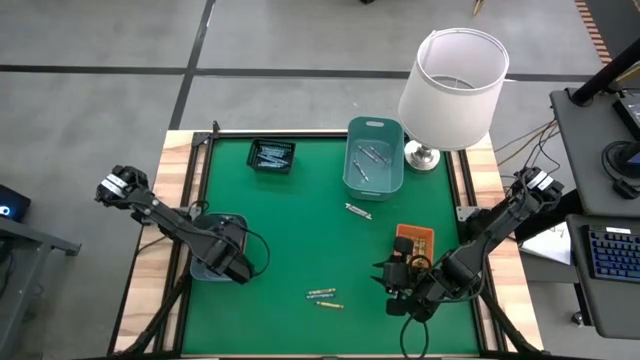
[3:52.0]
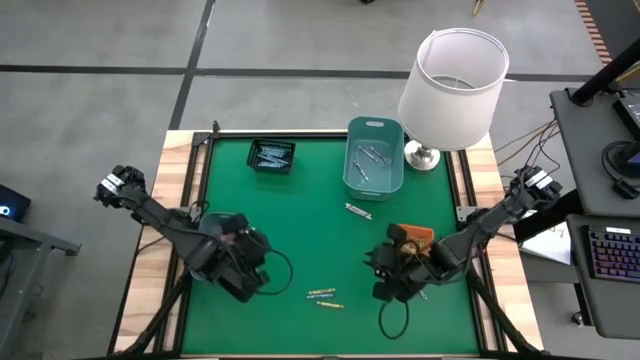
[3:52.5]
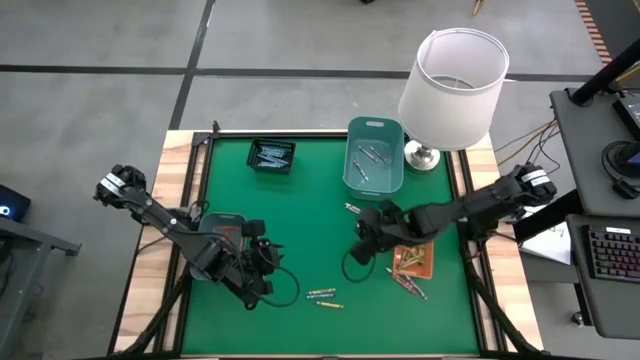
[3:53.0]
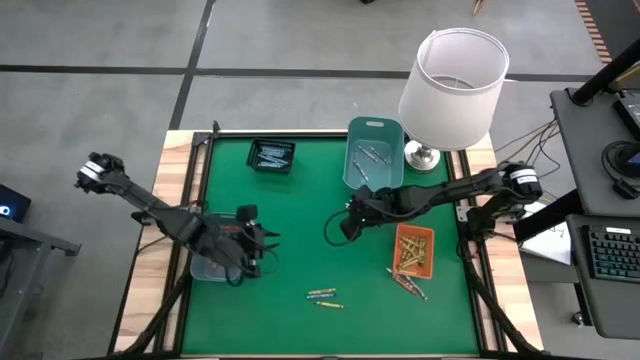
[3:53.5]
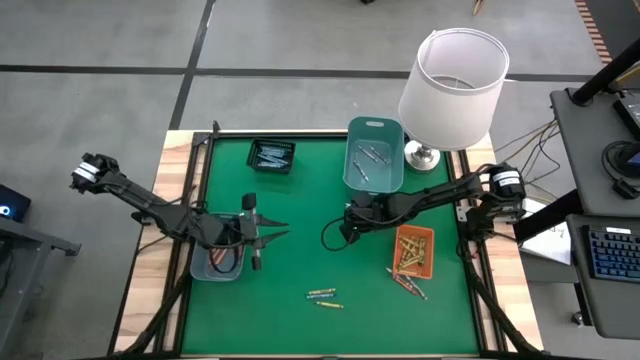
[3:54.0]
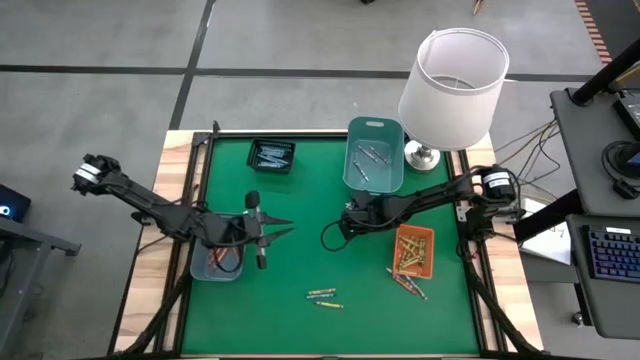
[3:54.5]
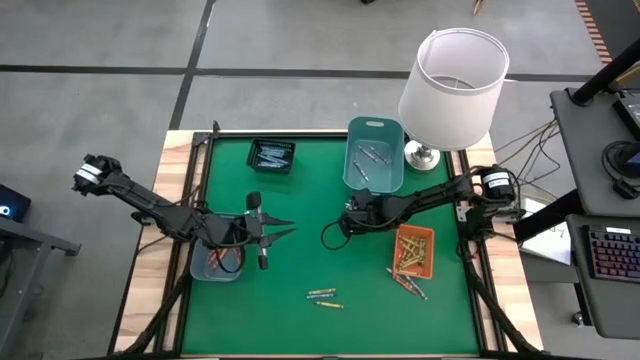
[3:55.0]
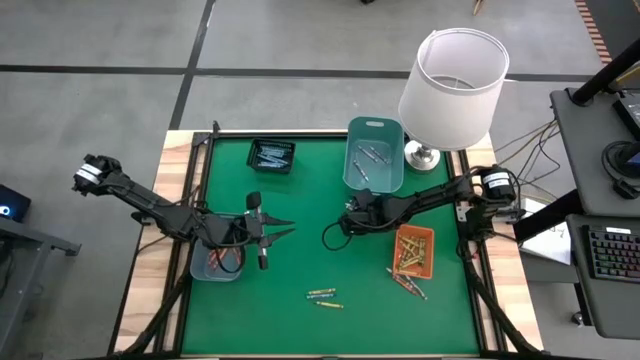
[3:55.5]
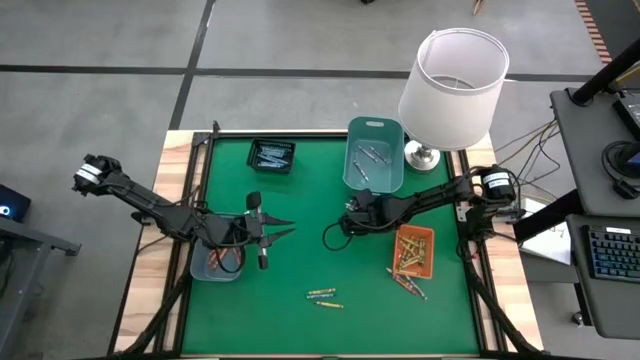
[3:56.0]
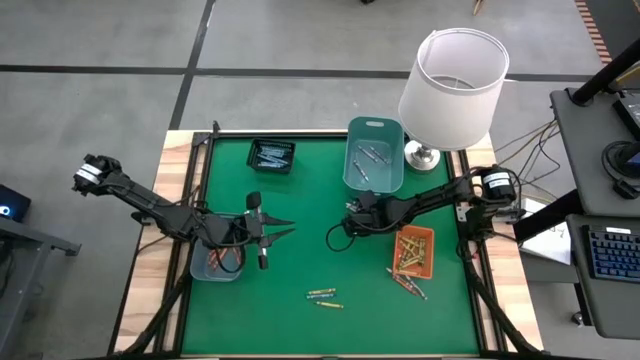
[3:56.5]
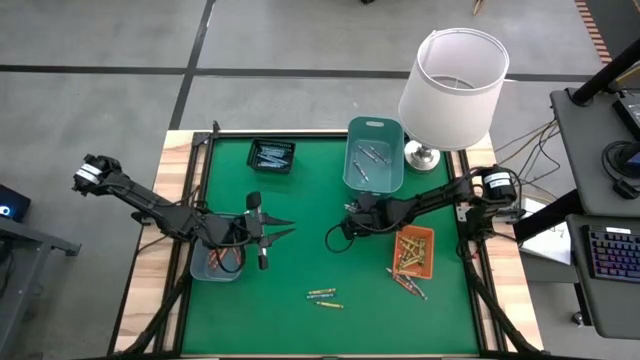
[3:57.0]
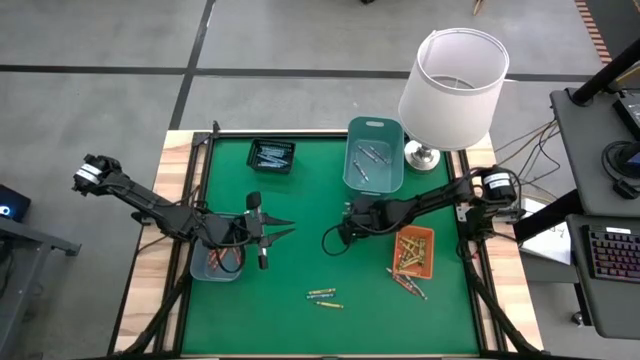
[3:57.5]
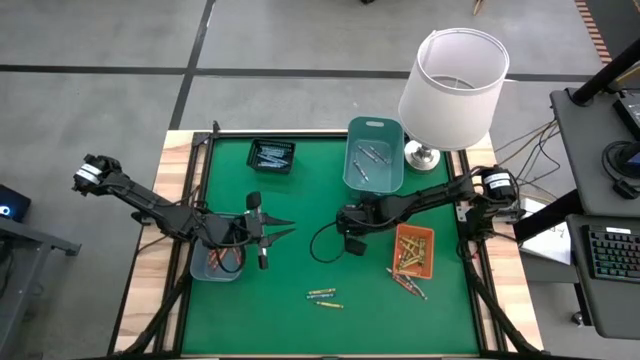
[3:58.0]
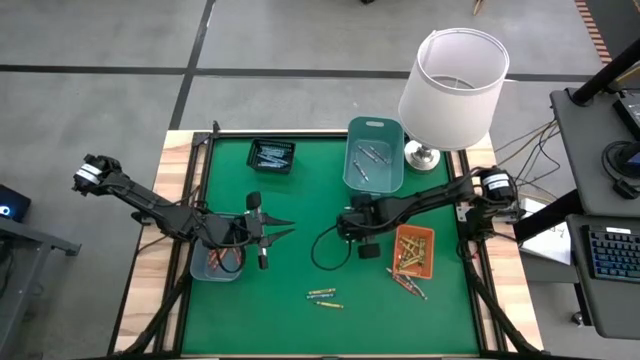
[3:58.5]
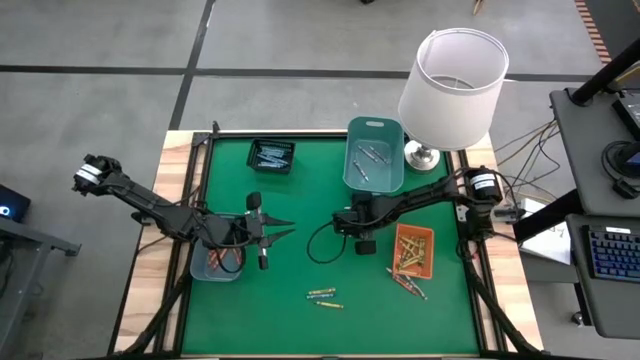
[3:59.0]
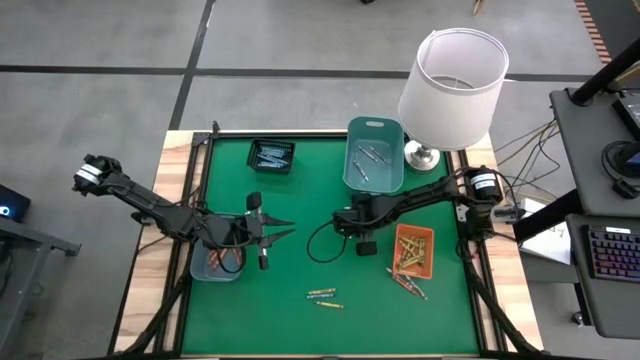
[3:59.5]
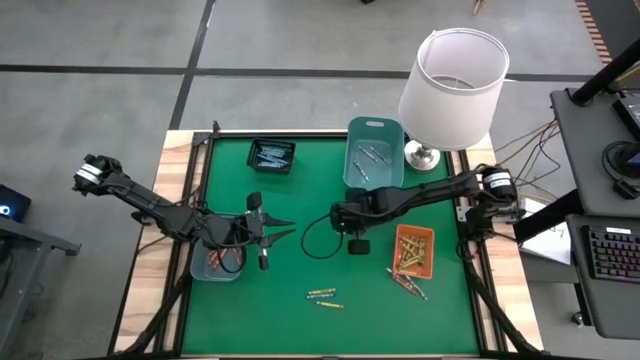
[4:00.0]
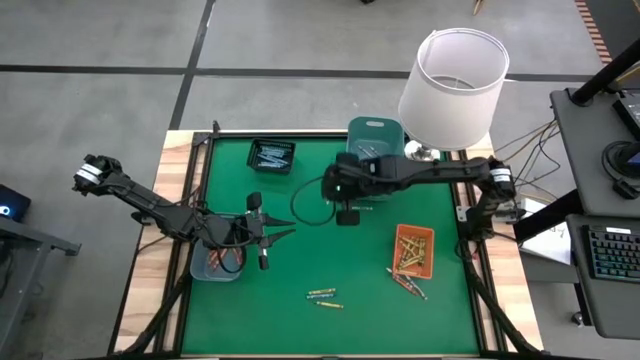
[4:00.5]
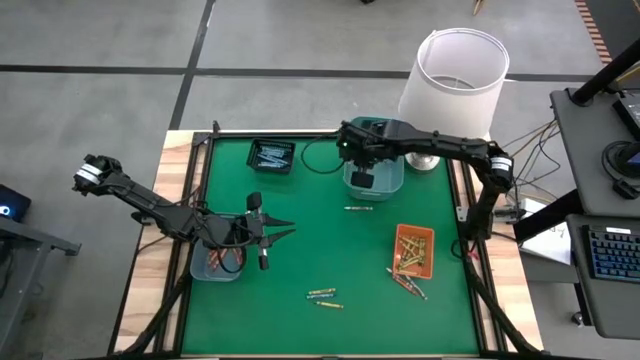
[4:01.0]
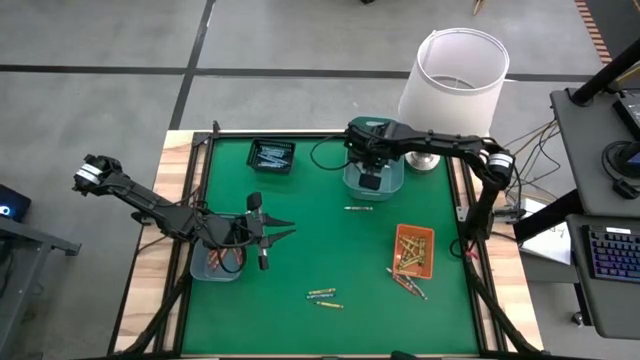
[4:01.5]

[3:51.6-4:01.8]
Task: Sort crayons
Put the white crayon into the green bin

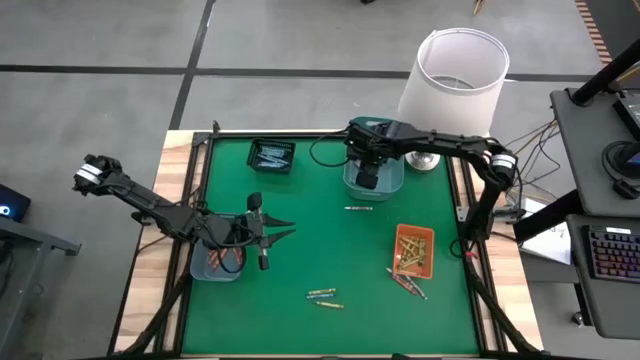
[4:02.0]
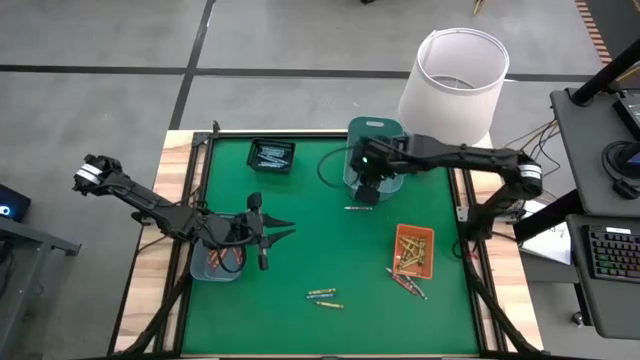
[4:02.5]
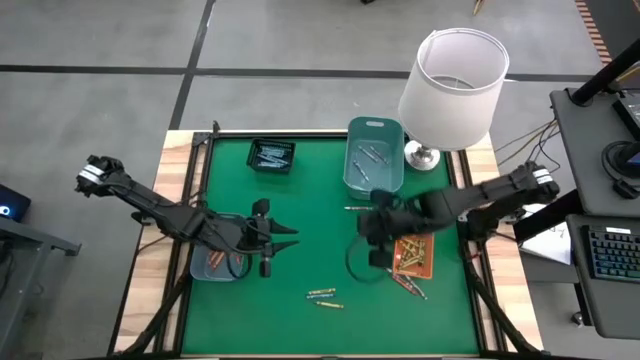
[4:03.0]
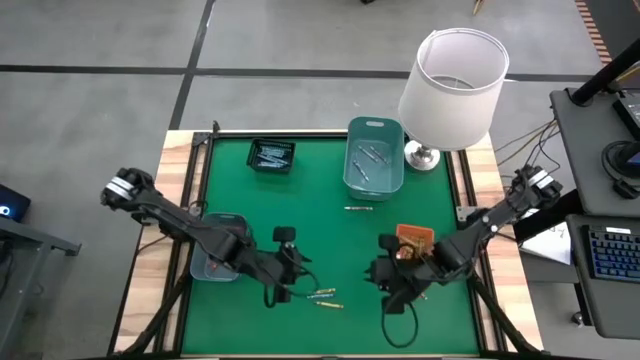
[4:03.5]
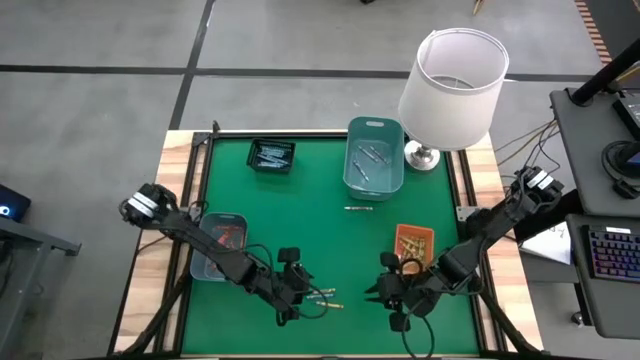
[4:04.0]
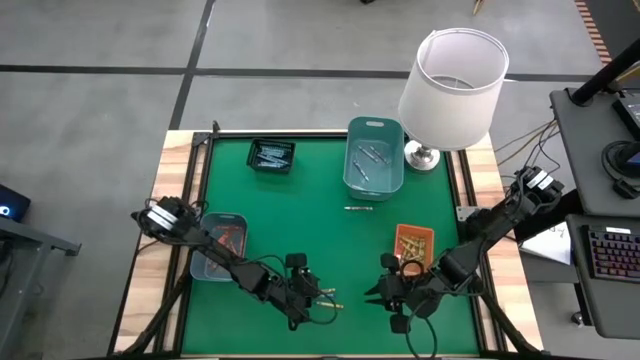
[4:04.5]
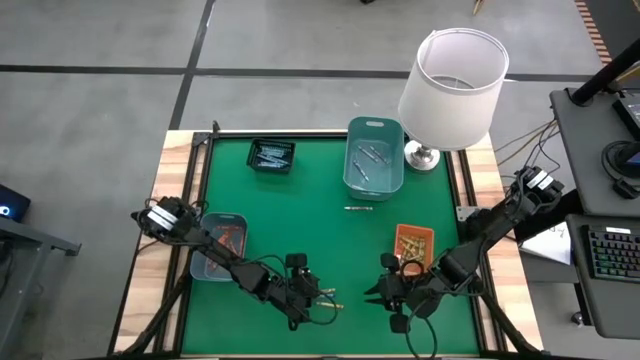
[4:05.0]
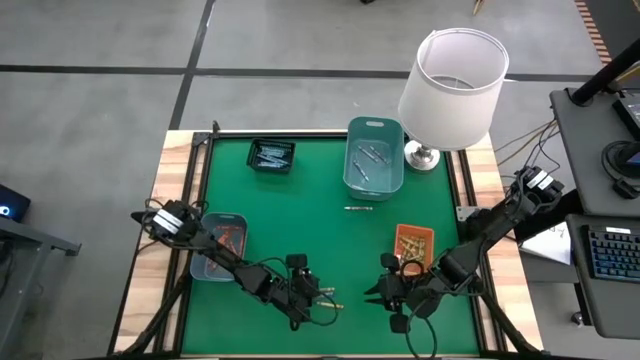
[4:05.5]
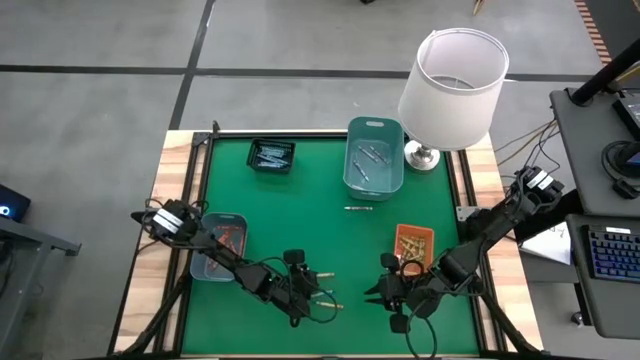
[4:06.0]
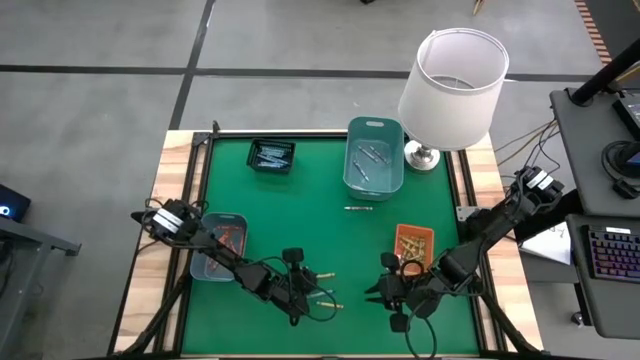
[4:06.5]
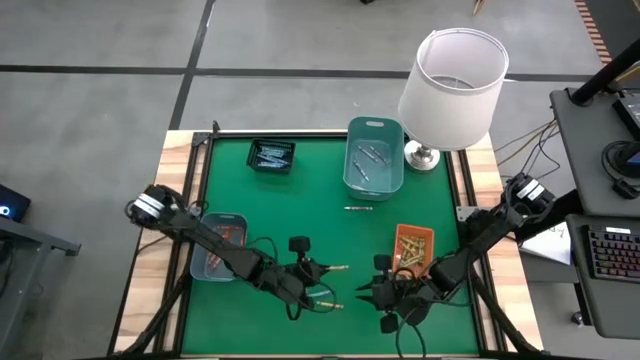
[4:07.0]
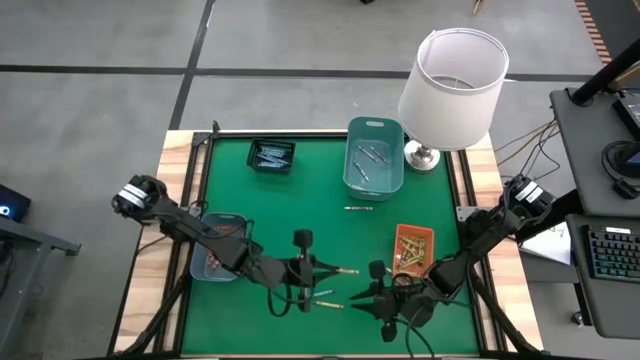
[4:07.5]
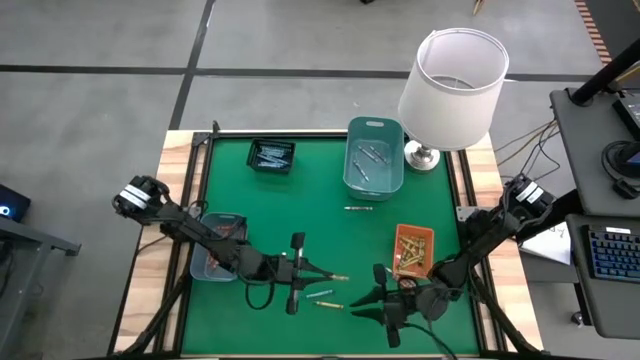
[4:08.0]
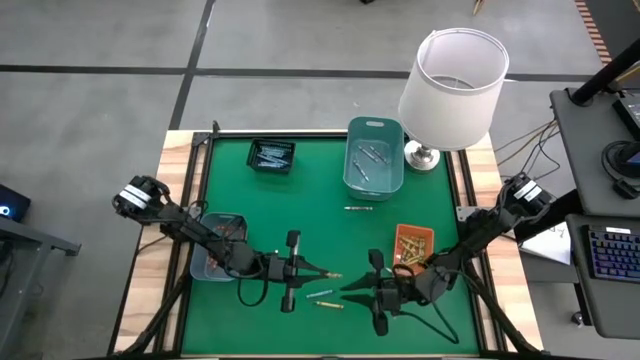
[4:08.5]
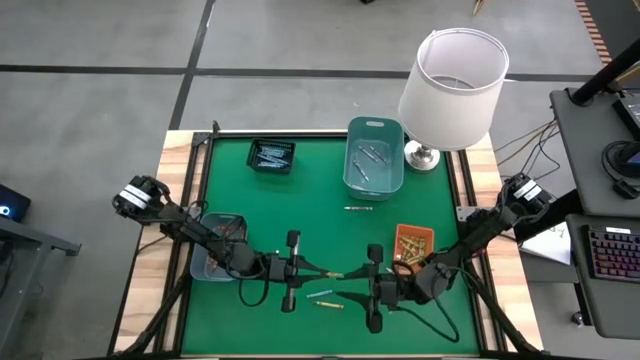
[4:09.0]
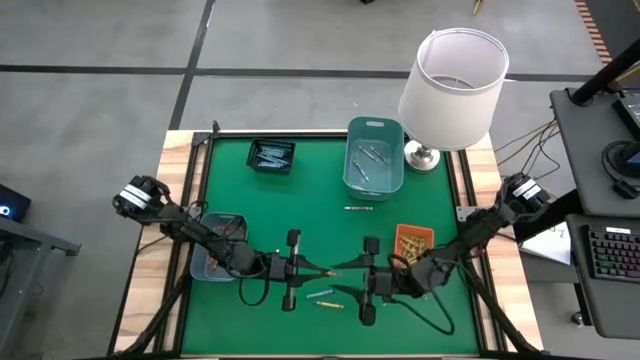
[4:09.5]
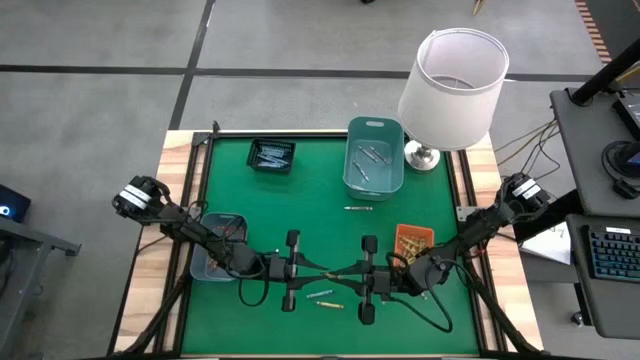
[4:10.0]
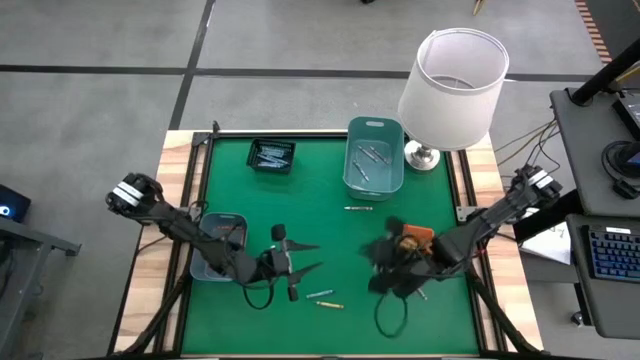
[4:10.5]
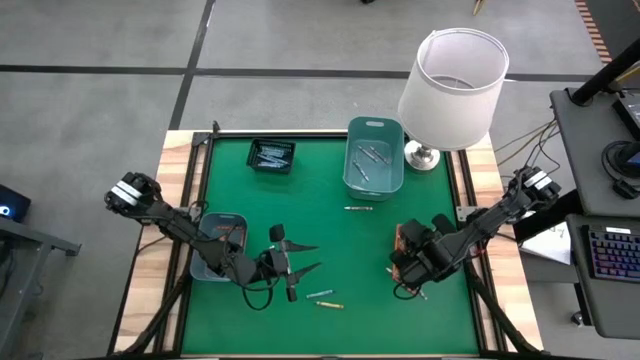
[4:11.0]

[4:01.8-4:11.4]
Put the green crayon into the orange bin
